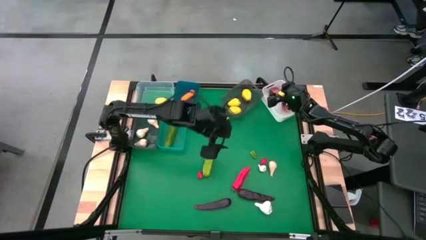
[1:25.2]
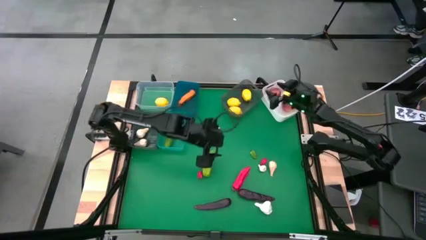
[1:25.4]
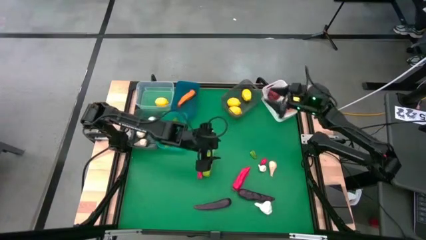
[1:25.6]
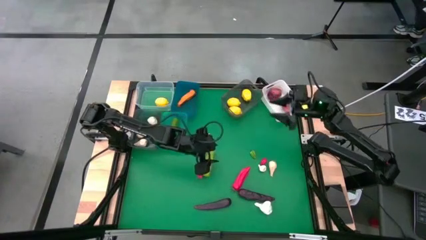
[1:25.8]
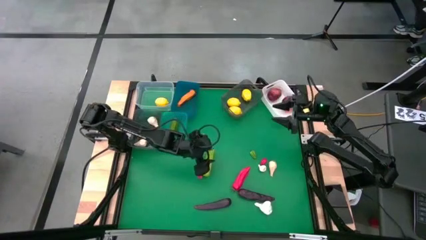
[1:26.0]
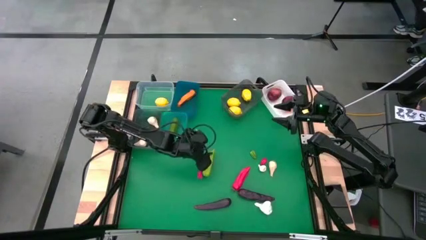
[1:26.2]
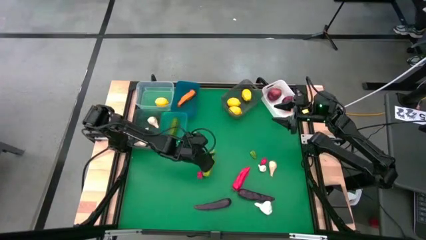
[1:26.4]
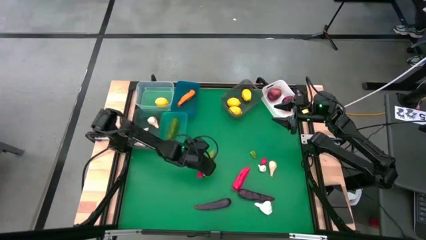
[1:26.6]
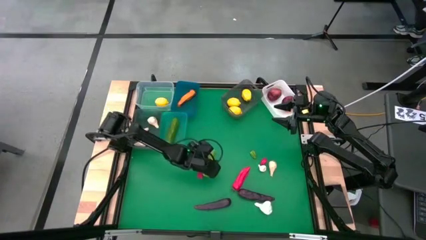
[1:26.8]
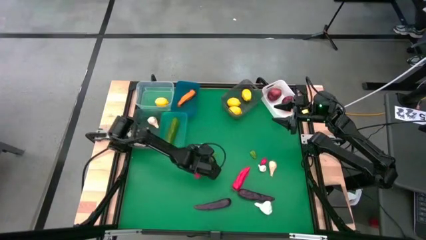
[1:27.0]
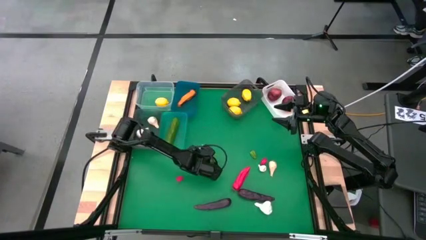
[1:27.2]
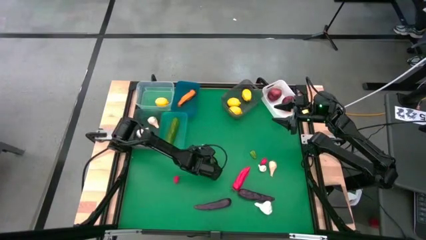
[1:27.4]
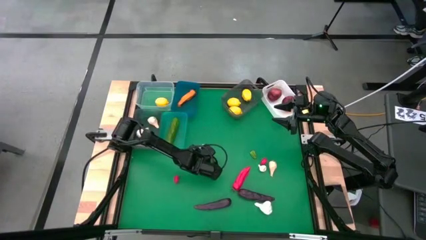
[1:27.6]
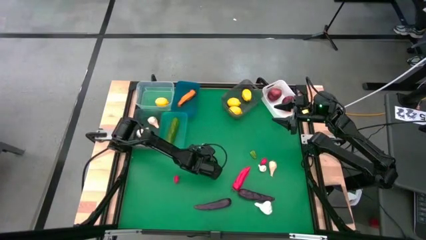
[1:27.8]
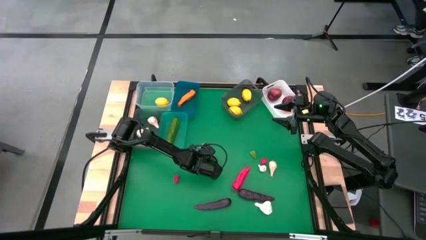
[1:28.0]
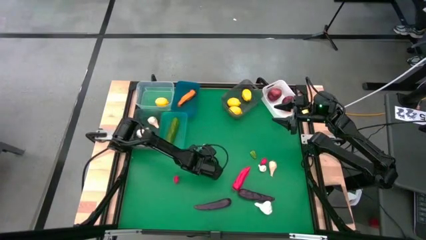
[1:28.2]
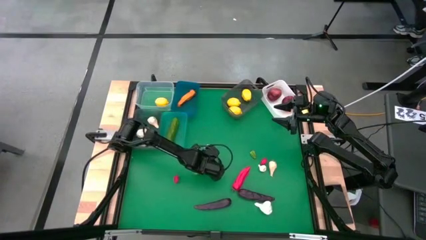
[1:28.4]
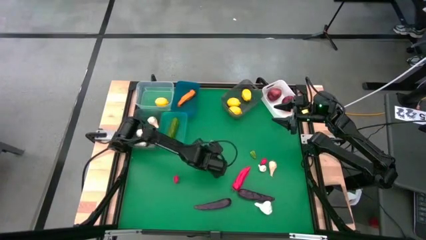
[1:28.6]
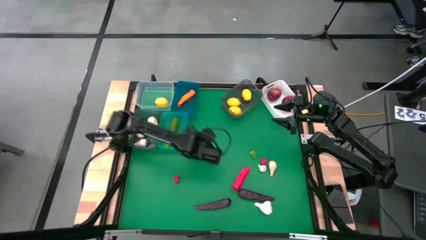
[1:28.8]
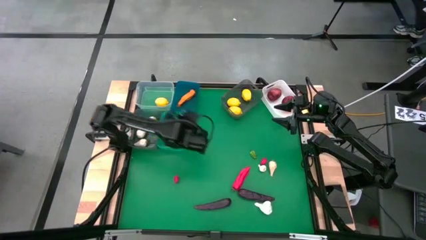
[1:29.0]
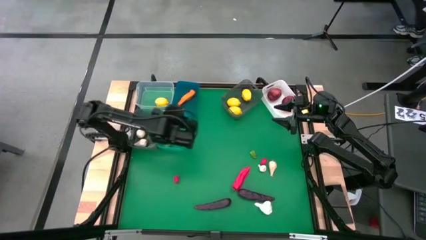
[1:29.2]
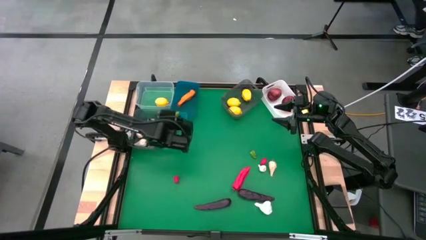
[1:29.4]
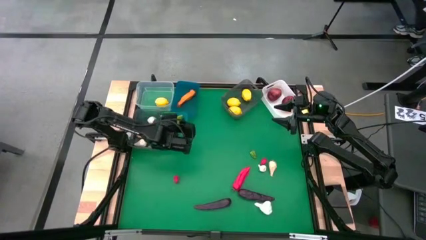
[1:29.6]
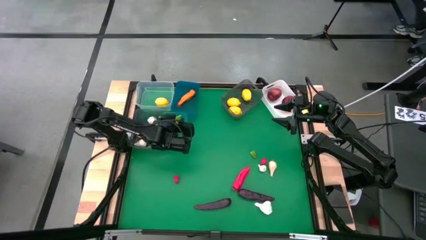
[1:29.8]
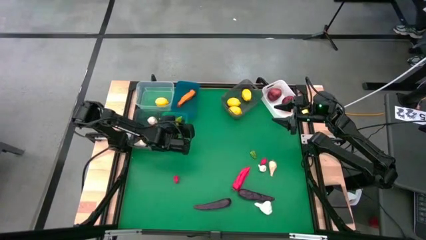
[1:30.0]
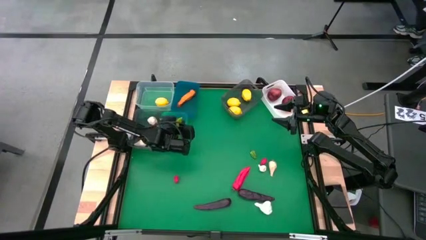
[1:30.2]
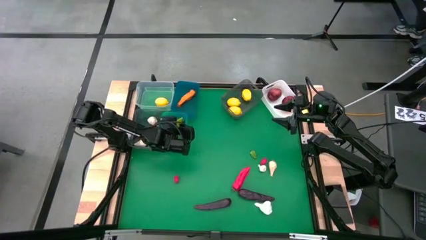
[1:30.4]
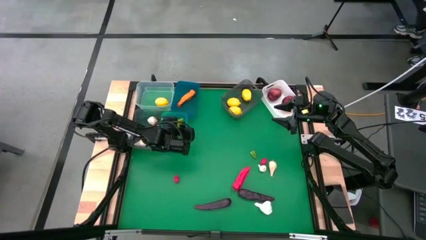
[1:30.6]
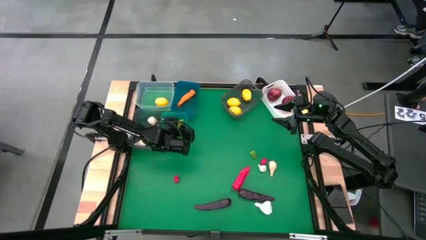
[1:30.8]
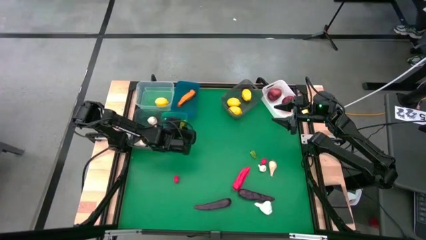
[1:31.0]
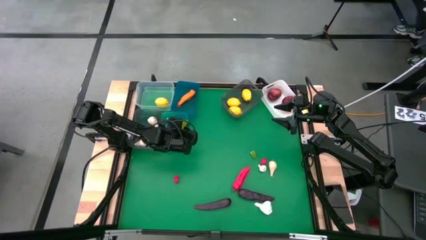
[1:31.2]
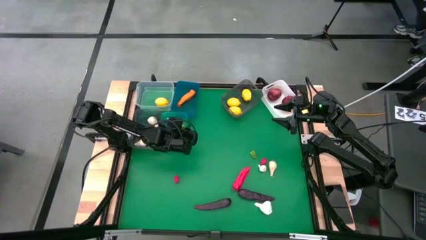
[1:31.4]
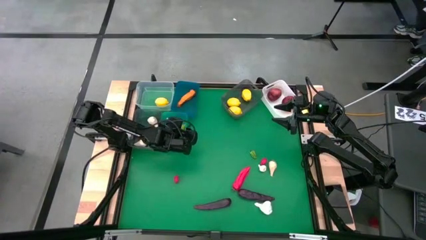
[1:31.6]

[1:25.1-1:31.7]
Task: Sort produce into baskets
Put the green cucumber into the light blue bin

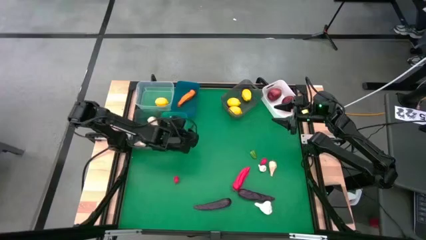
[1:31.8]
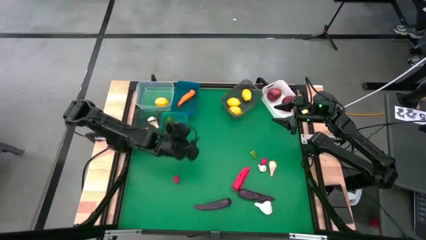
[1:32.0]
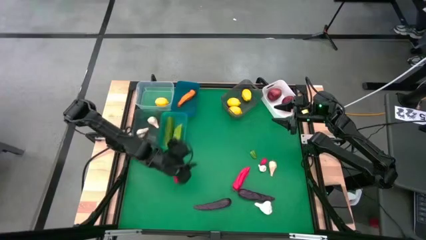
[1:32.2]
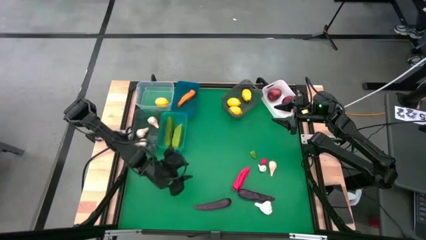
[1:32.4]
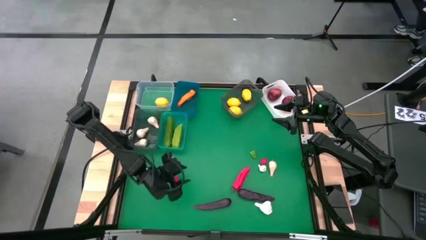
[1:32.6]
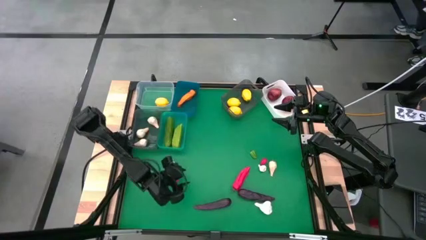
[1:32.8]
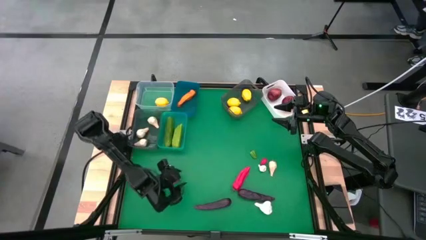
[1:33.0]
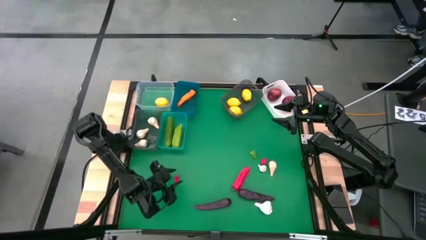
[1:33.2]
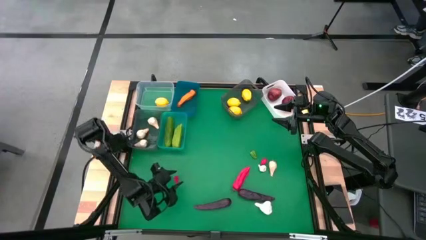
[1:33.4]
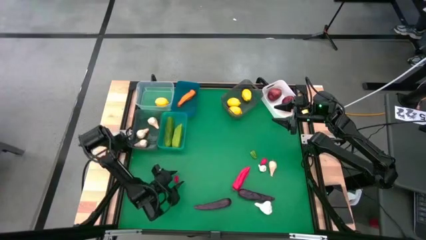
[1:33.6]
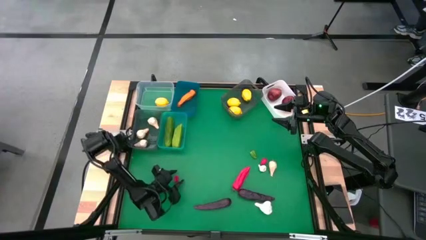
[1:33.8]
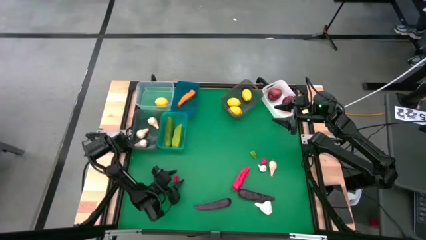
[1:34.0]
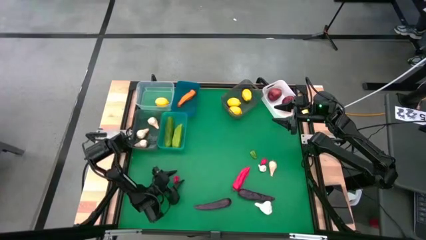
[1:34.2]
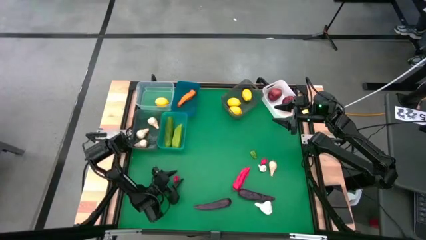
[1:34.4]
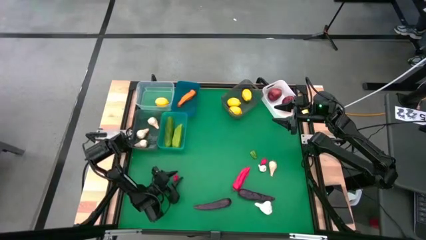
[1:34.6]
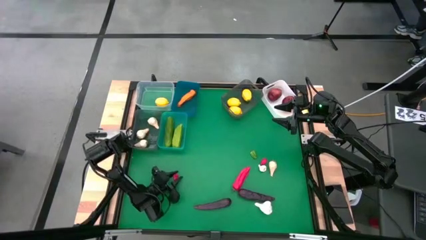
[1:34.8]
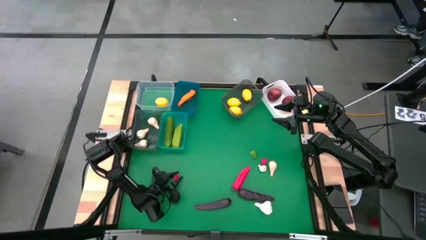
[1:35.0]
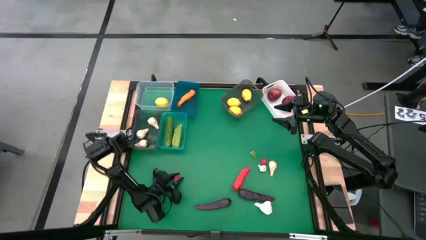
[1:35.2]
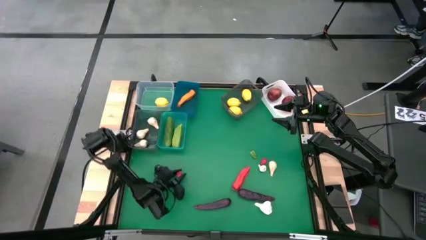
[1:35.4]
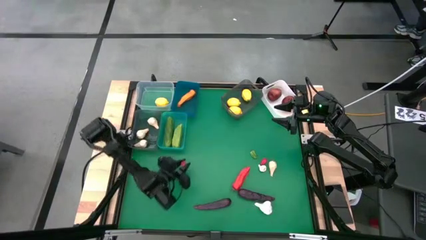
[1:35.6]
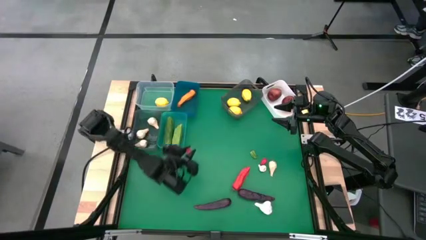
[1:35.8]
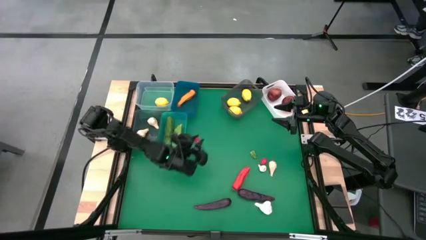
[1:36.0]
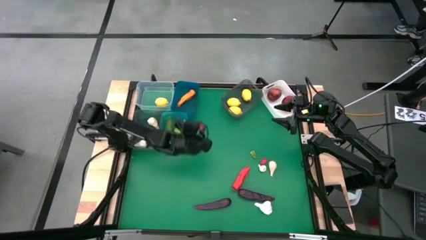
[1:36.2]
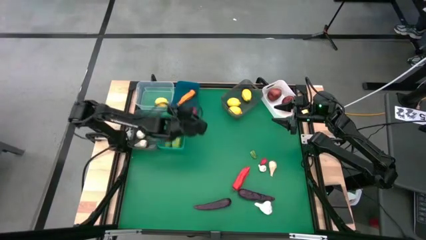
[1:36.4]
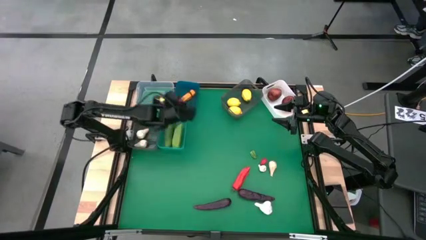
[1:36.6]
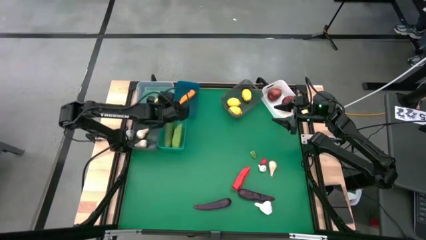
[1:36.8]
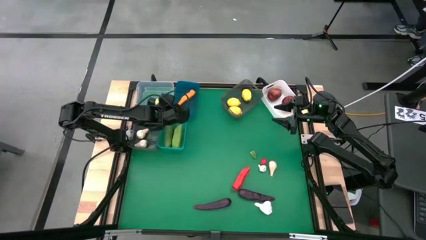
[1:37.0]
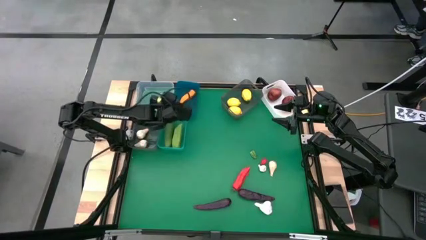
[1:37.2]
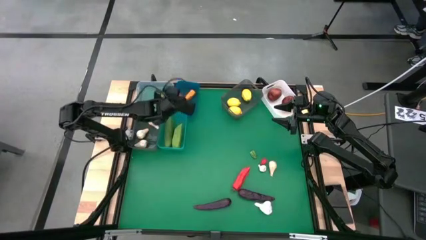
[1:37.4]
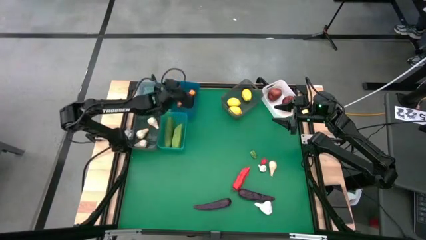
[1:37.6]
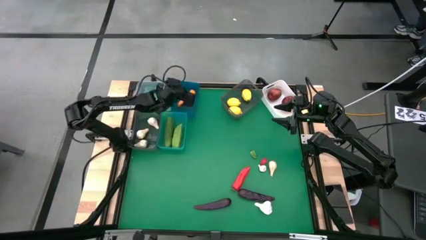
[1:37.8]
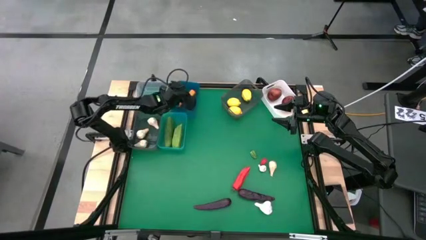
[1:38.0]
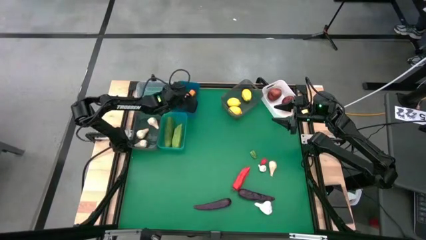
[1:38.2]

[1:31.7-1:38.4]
Put the red pepper into the blue bin

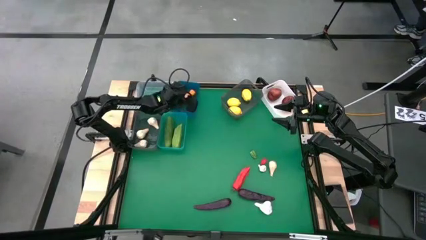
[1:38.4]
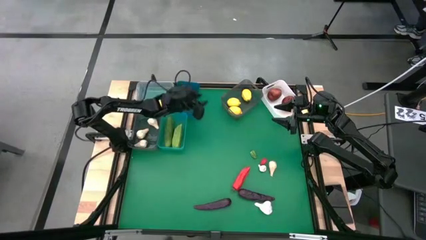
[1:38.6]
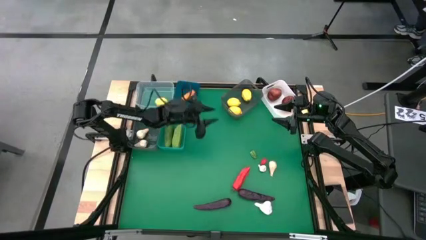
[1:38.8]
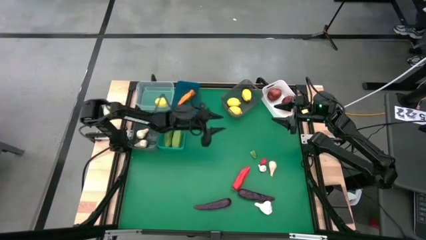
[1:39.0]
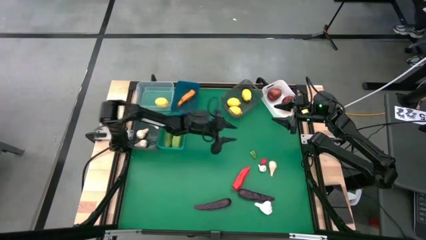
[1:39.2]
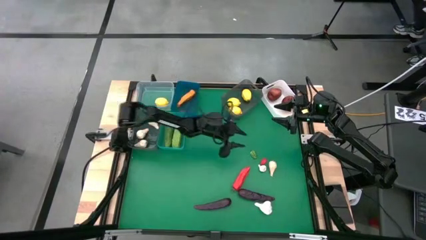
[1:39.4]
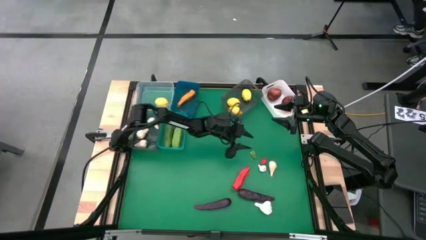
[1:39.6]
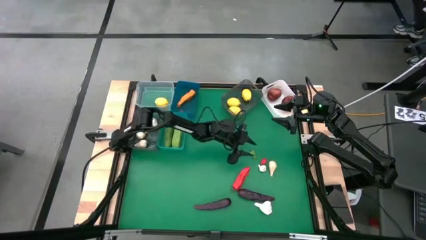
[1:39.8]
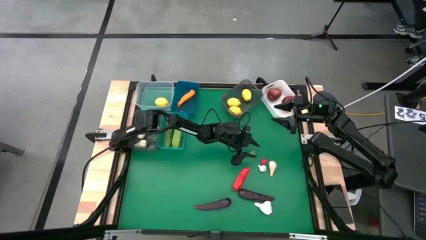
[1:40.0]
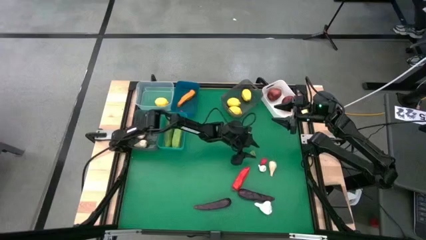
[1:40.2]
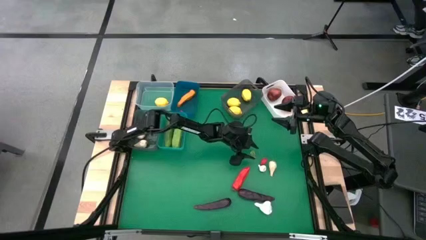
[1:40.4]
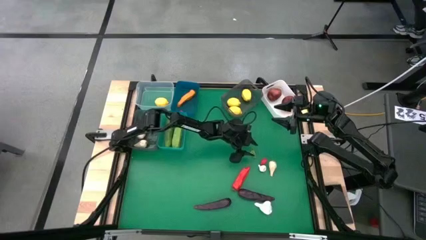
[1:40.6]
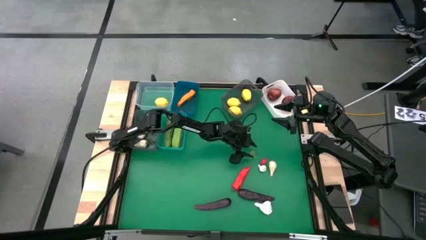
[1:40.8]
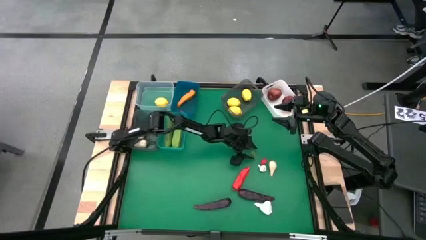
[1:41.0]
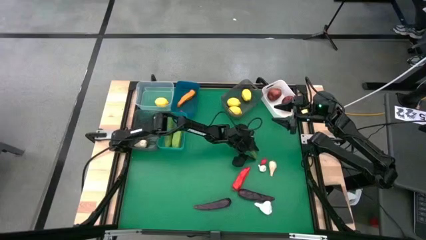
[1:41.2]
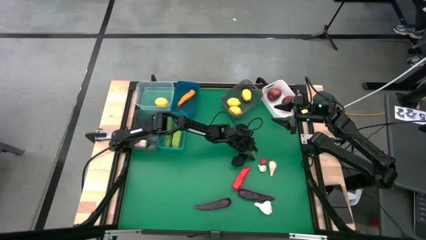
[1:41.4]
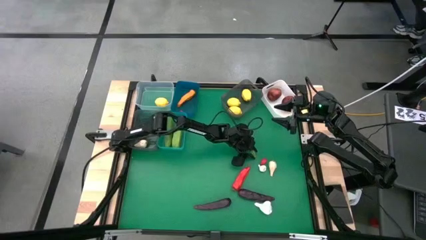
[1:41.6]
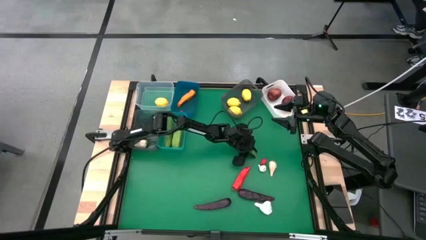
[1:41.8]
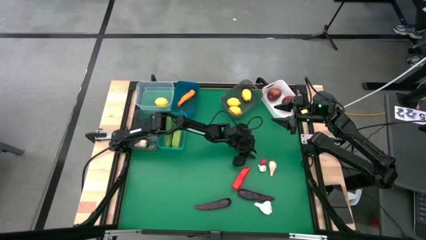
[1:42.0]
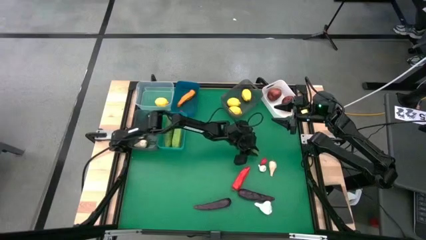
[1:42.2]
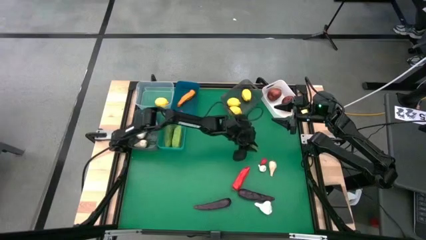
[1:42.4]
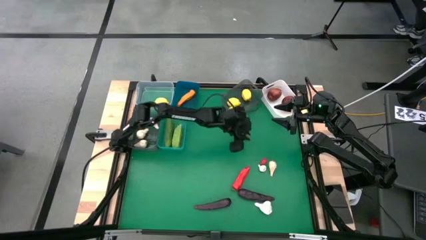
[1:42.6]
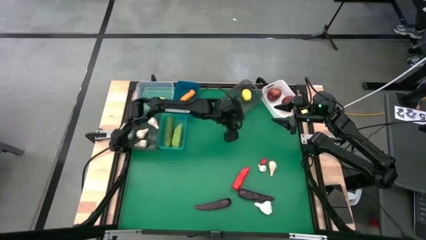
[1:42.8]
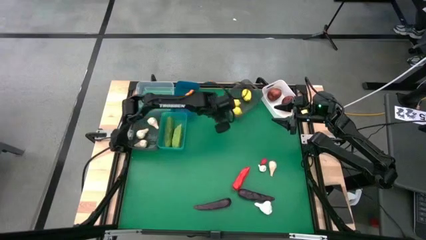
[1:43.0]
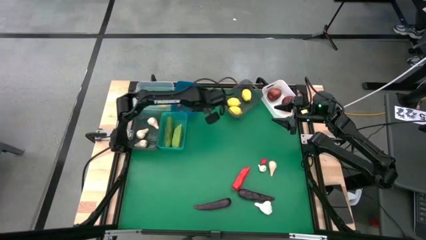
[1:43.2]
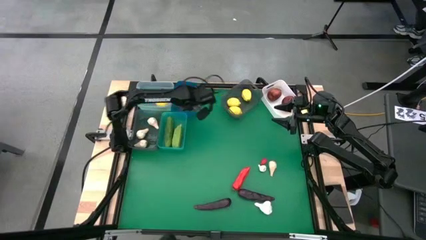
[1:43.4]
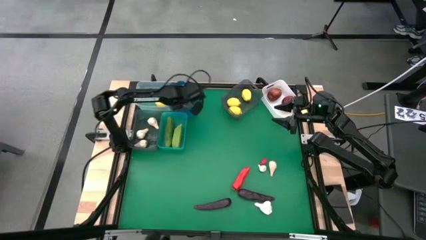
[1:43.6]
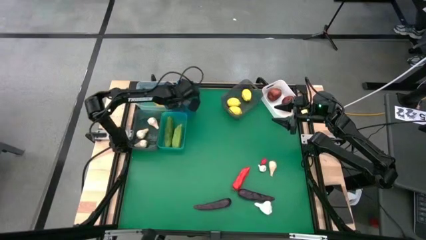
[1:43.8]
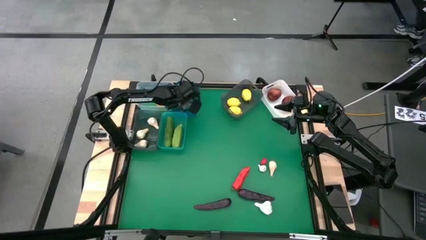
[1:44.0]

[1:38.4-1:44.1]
Put the green pepper into the blue bin
